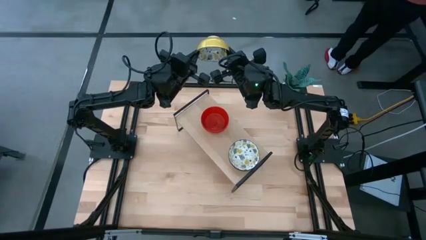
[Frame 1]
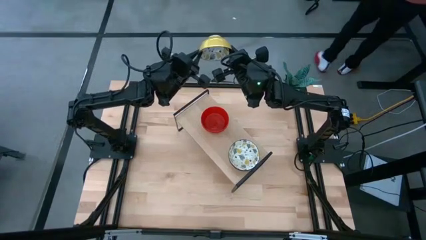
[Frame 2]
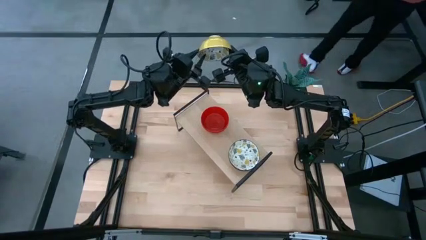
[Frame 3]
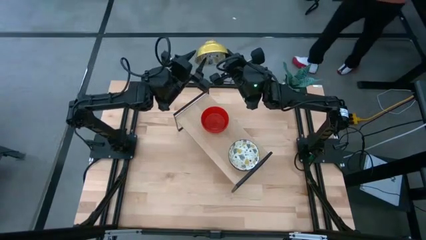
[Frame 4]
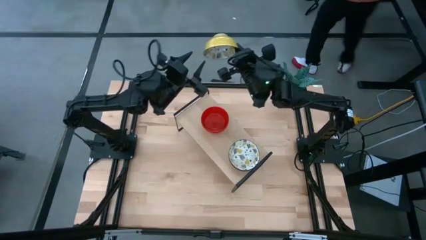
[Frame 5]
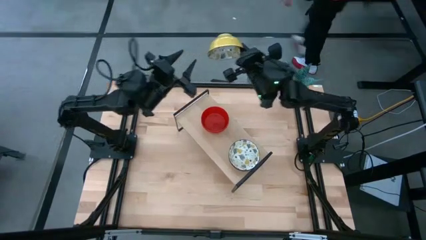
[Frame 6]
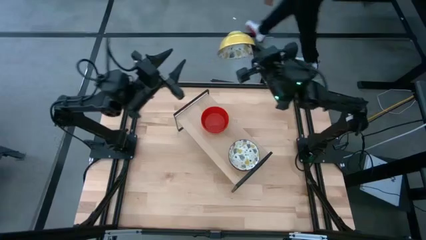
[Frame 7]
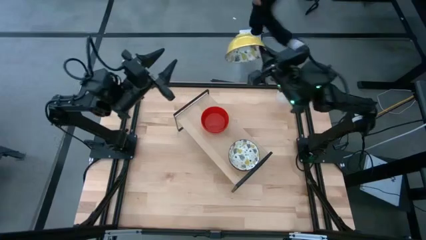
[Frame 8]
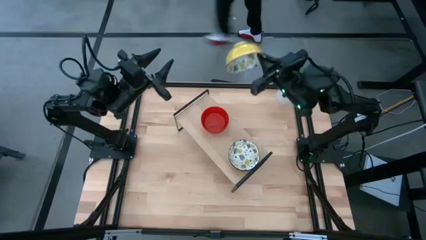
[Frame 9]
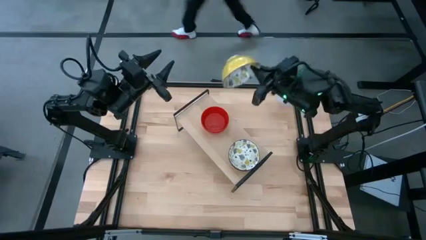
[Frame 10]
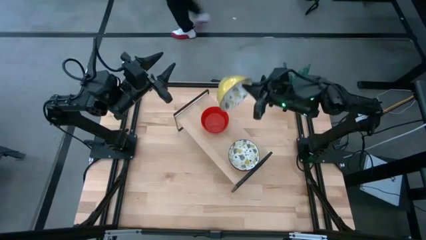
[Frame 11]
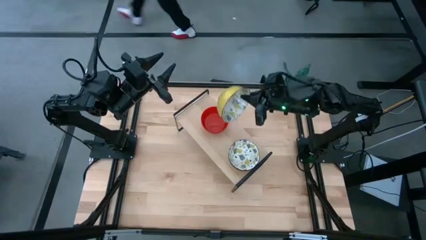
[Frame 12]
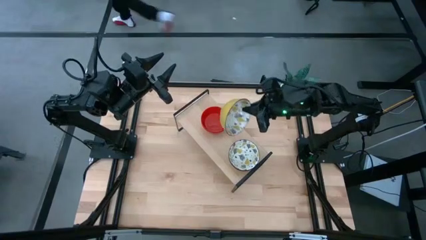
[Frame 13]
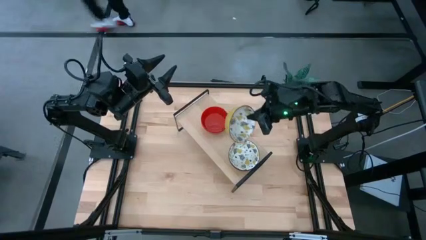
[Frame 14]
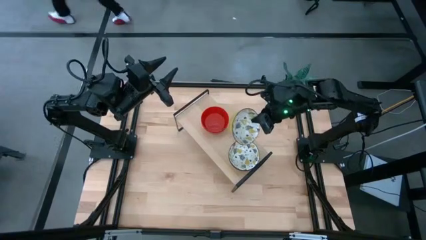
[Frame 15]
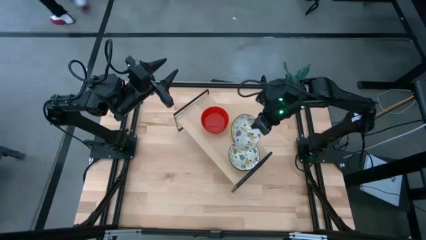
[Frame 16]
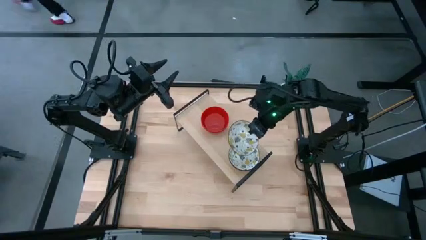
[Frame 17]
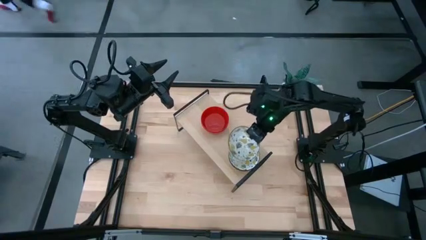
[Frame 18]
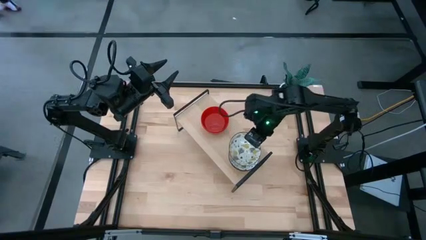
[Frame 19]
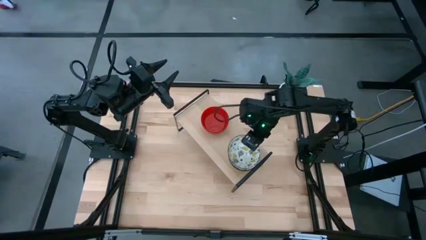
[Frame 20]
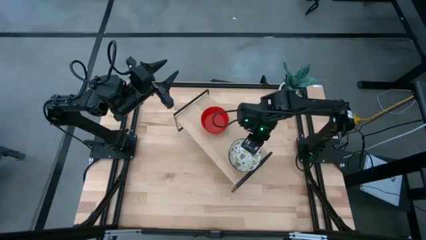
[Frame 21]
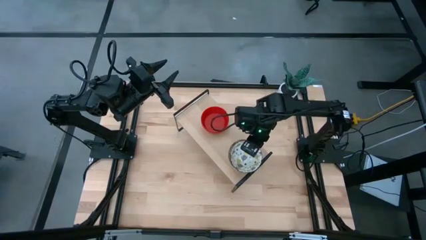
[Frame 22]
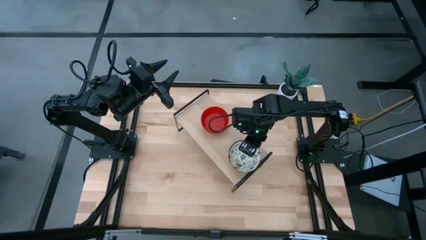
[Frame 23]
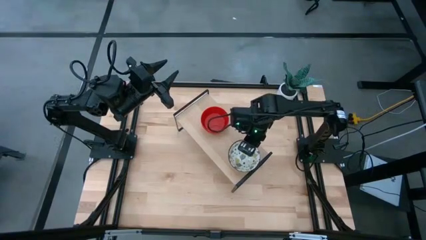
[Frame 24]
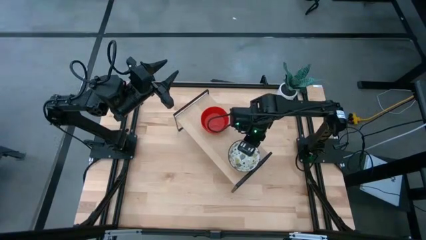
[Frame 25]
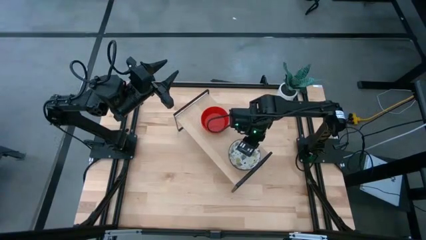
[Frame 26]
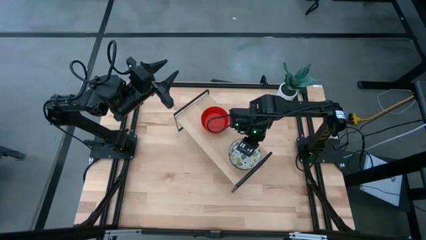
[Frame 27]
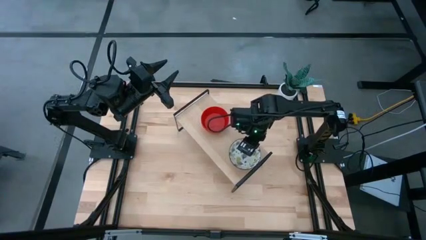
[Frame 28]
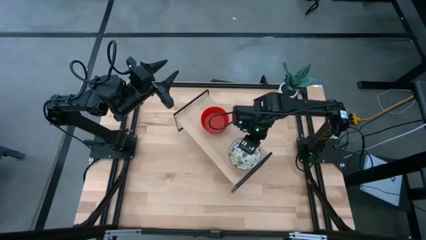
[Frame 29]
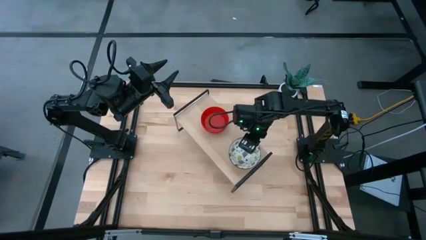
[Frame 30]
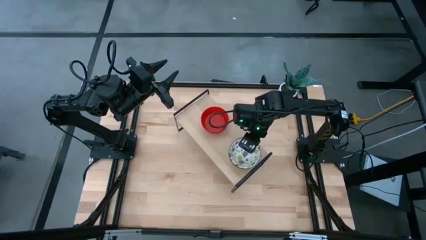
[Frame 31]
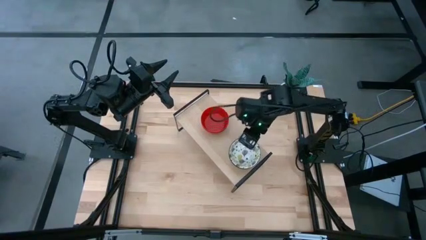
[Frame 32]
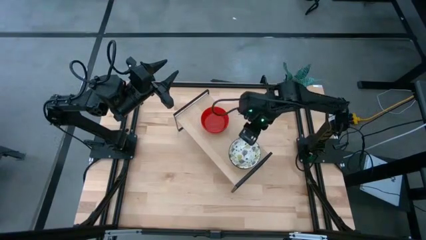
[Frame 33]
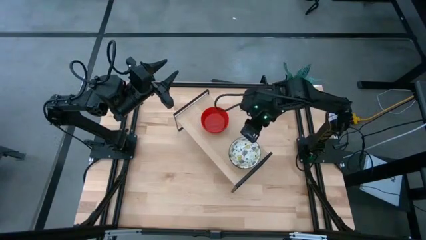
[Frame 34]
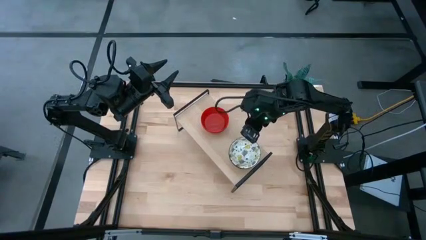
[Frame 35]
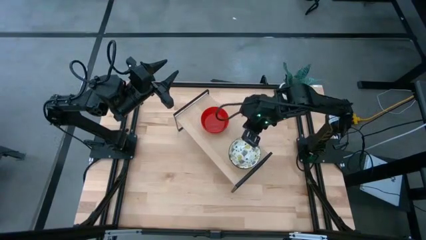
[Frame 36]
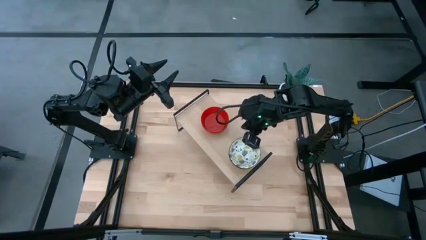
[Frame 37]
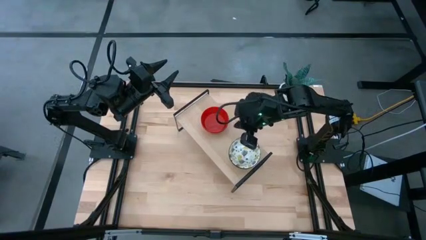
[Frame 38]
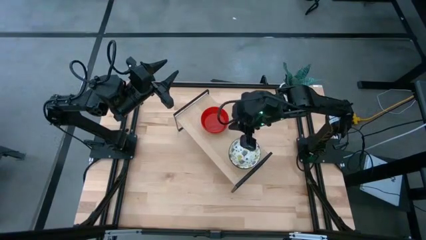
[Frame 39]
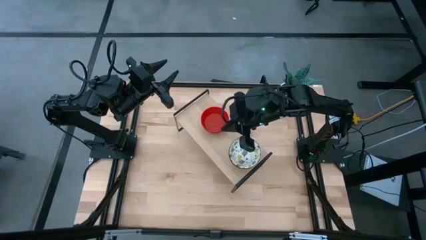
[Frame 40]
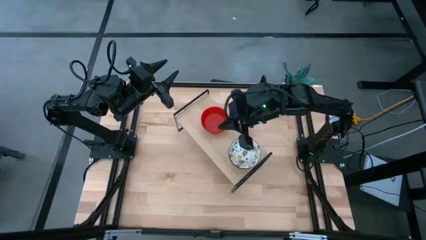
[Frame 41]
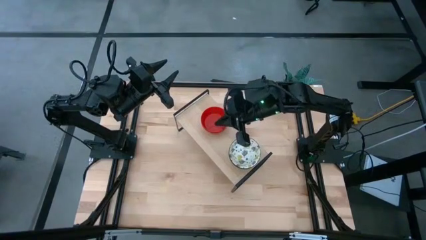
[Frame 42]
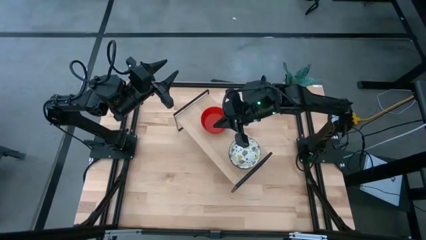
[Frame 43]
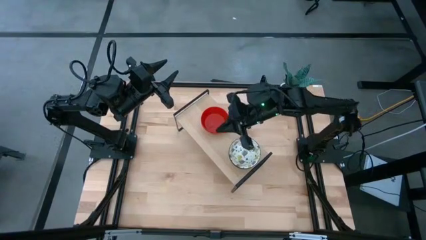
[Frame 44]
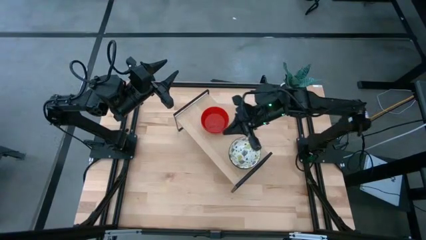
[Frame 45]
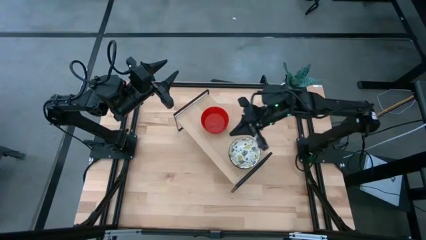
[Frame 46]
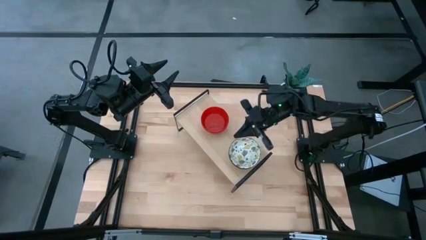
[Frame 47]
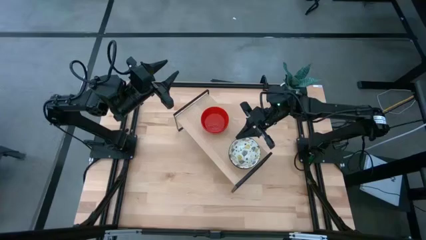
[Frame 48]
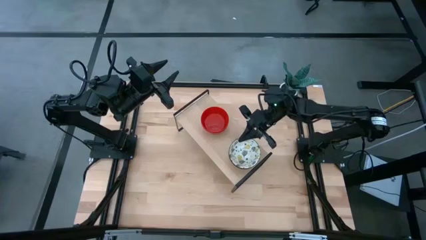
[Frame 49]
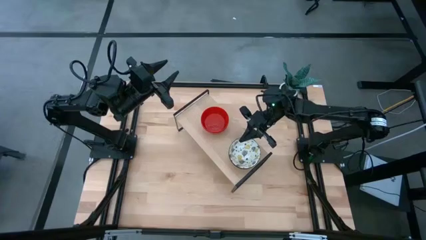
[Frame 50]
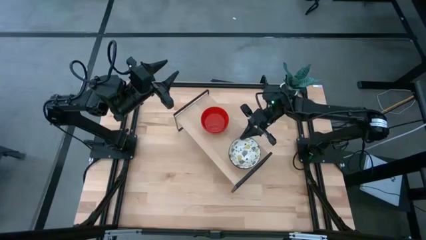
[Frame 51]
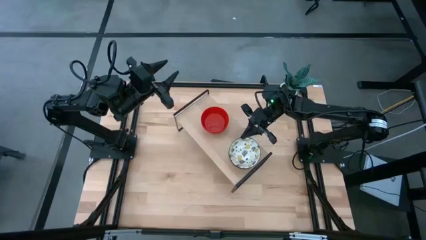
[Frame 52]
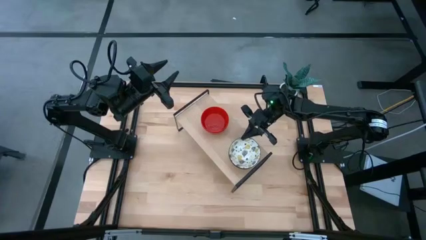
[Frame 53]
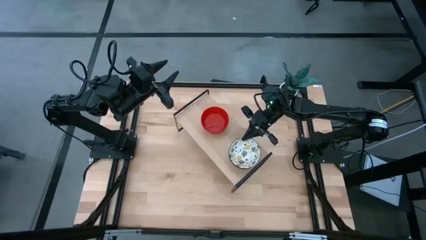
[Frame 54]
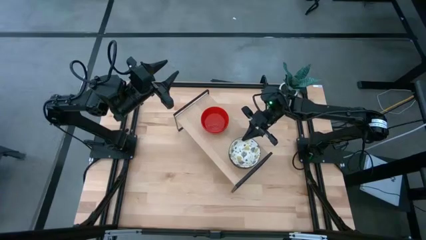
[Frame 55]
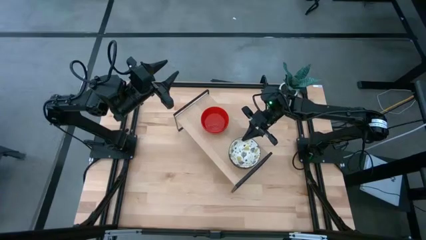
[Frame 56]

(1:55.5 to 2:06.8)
Task: Pick & Place Mini bowls
Stack the white patterned bowl on top of the other white patterned bowls on the shelf

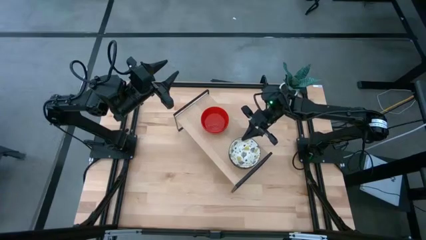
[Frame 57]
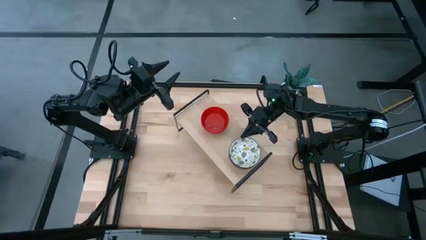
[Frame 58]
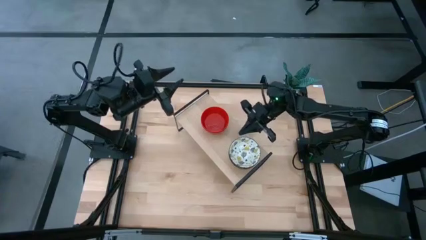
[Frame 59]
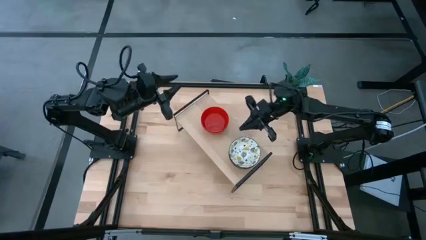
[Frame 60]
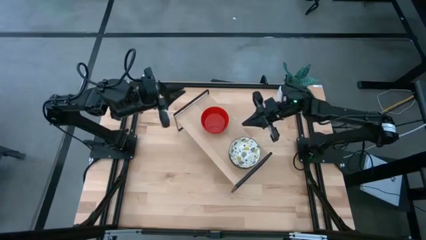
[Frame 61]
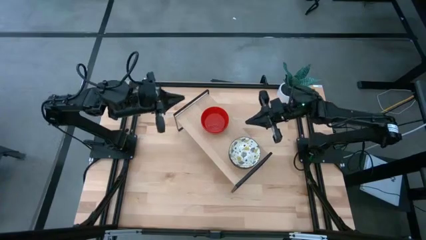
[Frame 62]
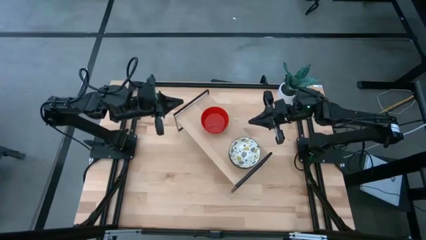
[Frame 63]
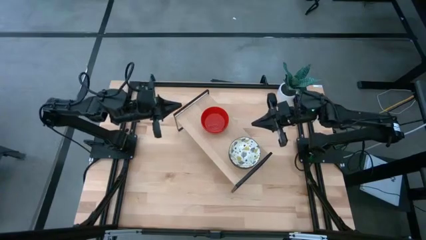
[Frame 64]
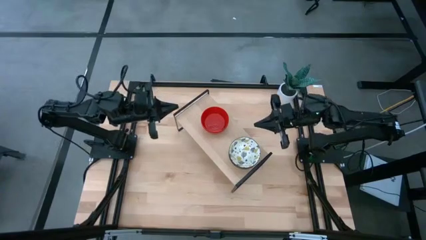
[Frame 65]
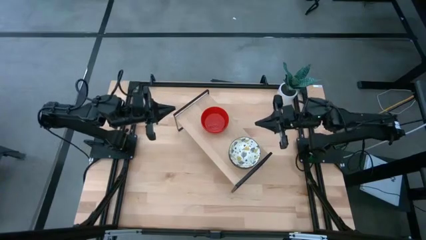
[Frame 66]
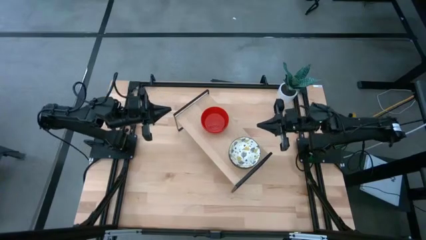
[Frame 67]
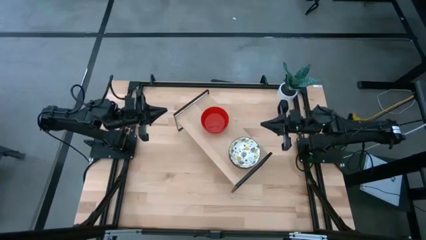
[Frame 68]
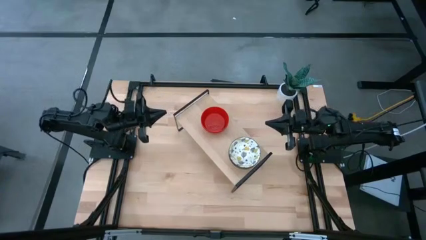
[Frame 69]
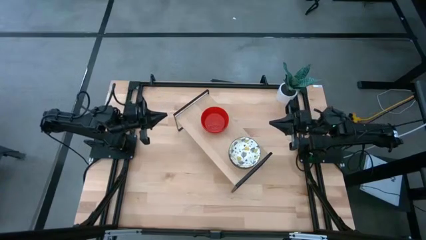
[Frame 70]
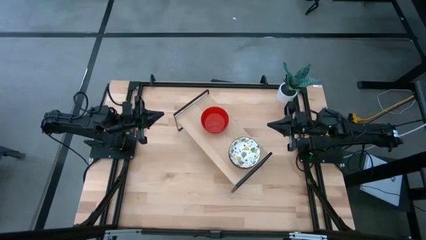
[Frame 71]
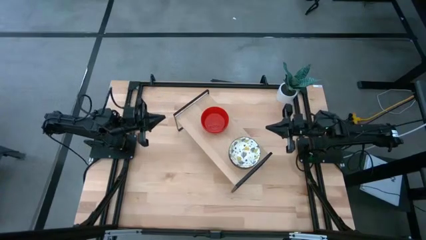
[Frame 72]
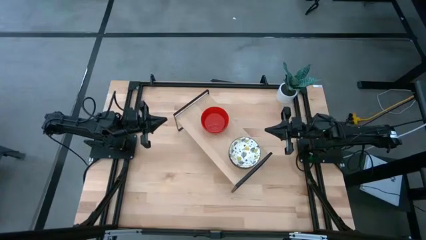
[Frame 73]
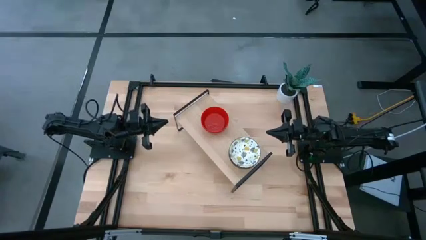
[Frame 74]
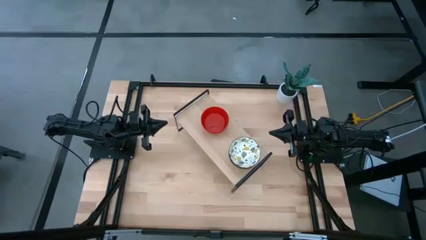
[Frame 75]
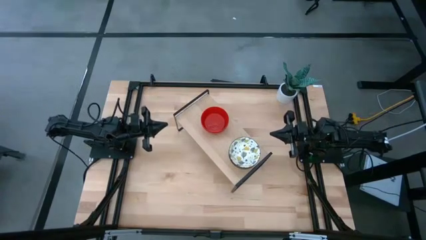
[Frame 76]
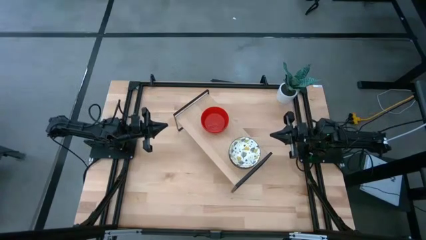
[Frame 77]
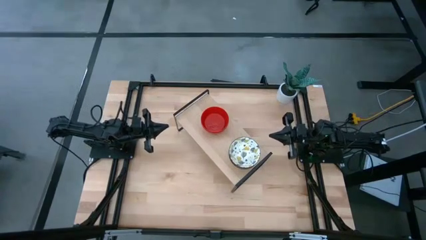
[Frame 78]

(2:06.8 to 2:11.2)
Return to Home Position
